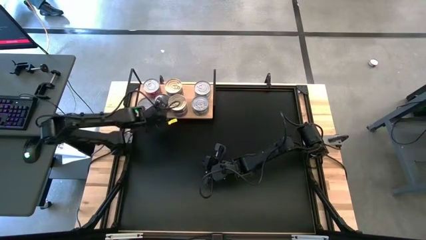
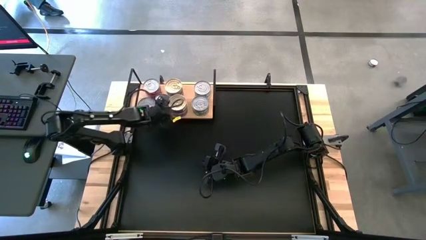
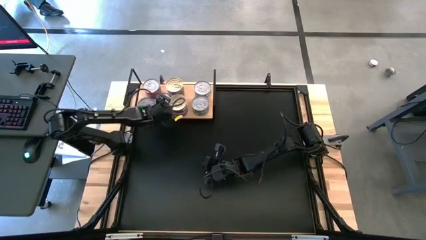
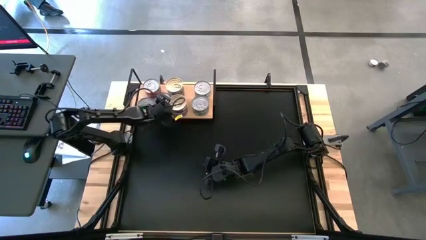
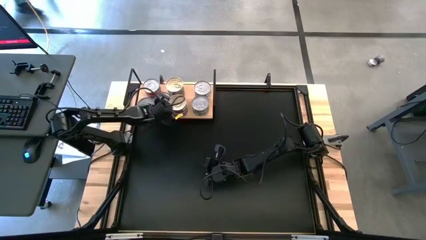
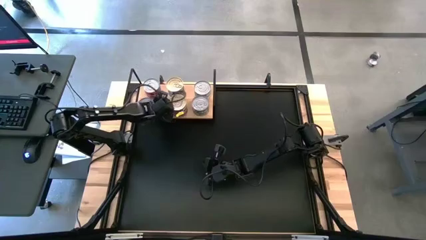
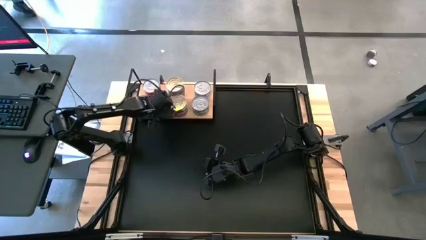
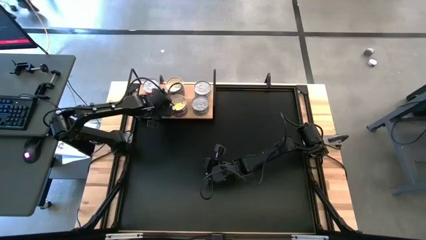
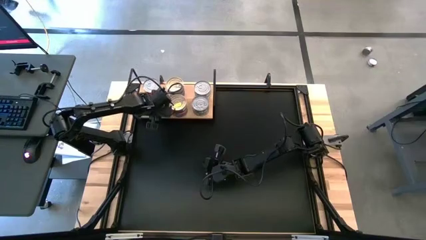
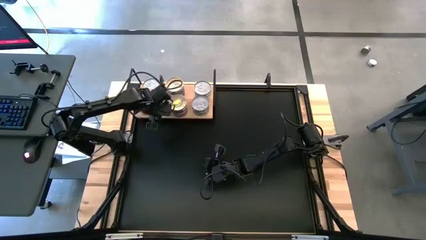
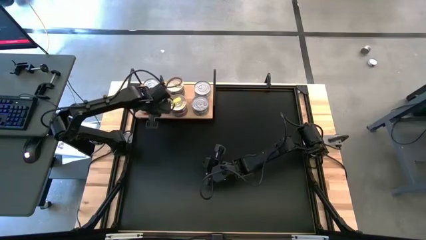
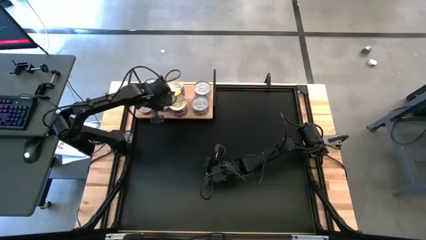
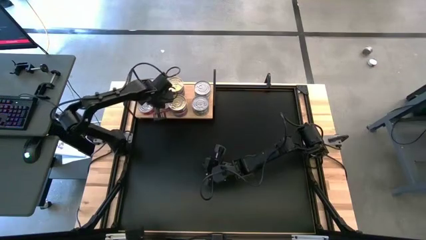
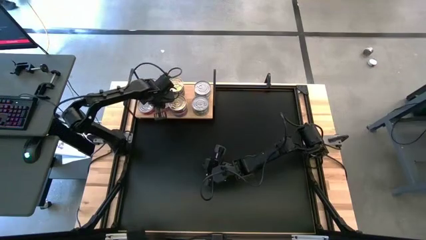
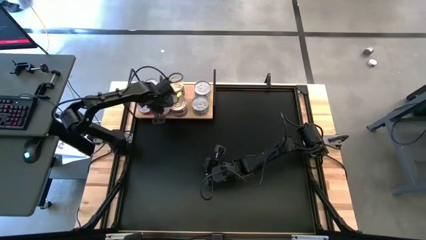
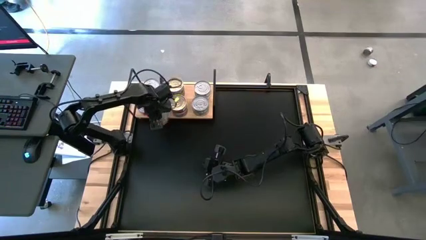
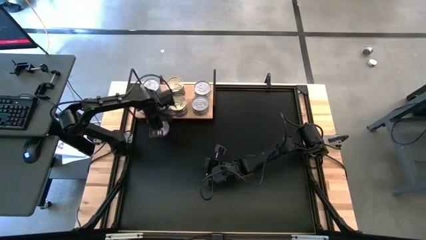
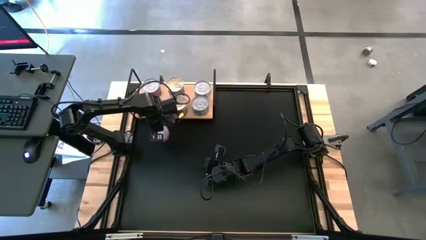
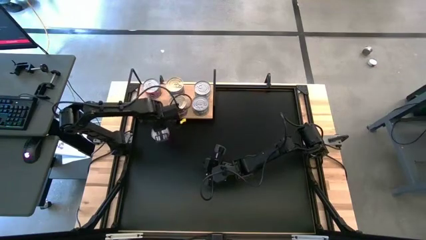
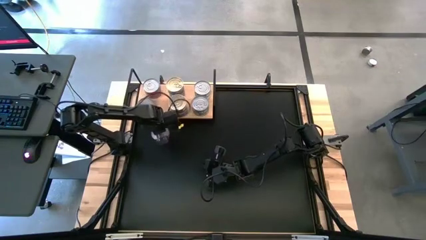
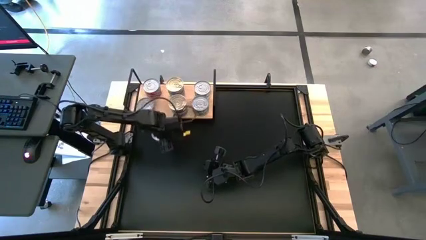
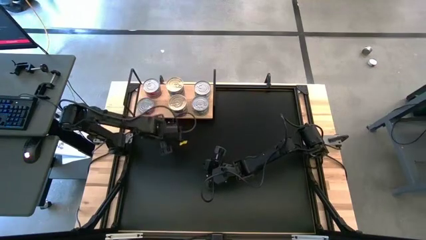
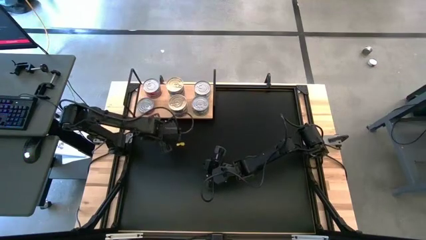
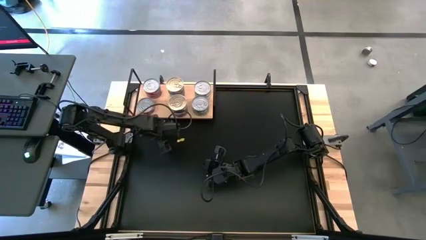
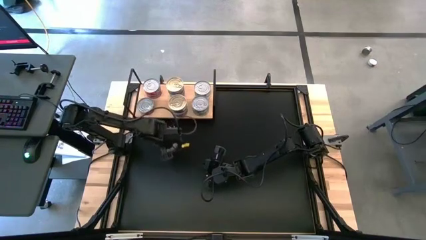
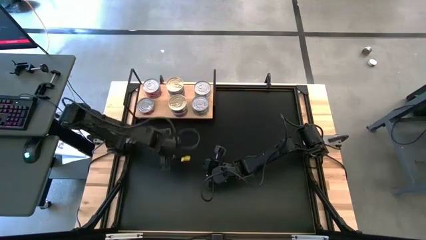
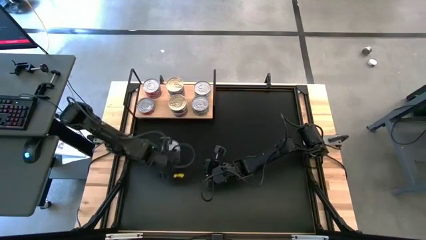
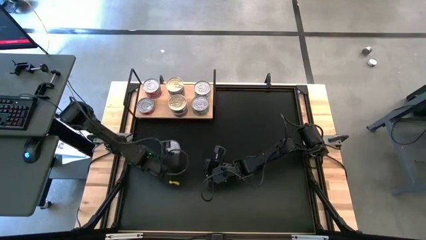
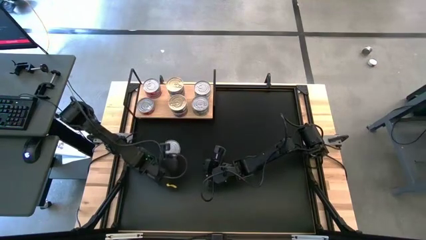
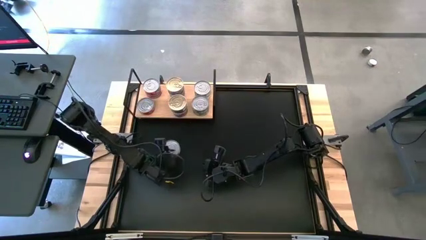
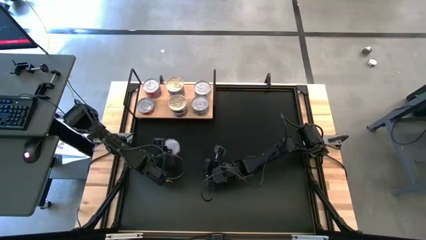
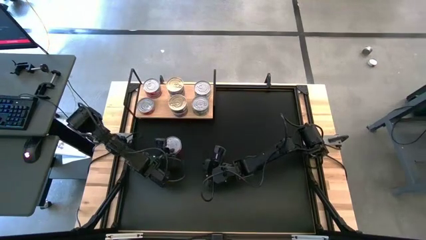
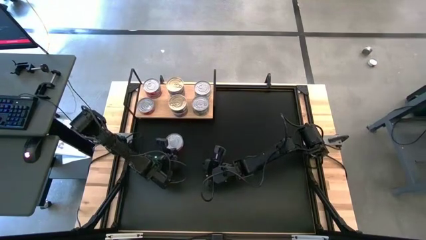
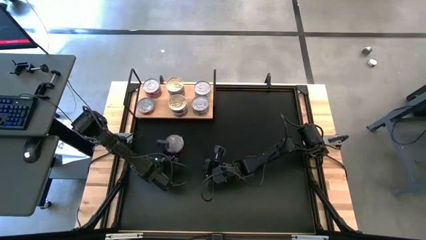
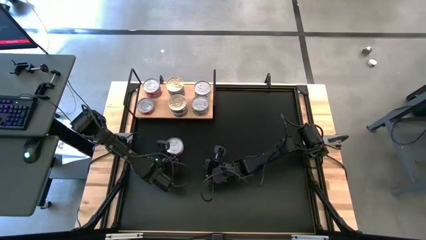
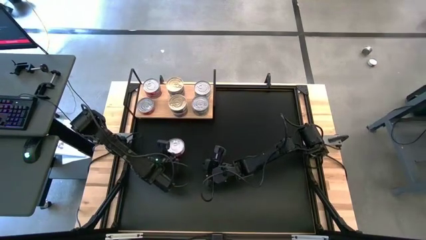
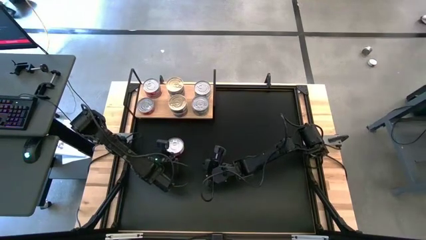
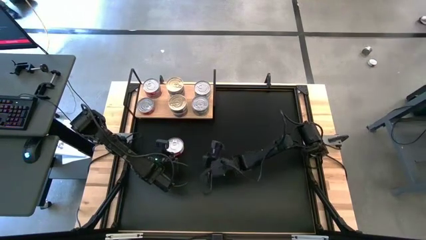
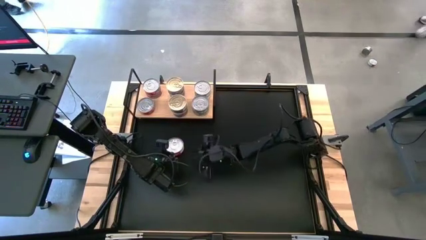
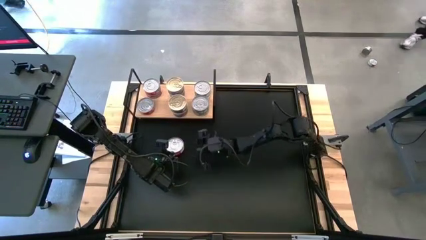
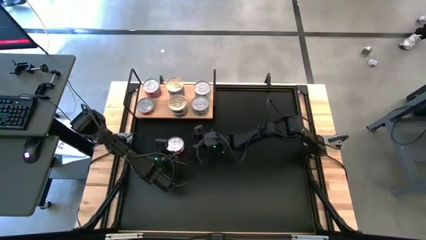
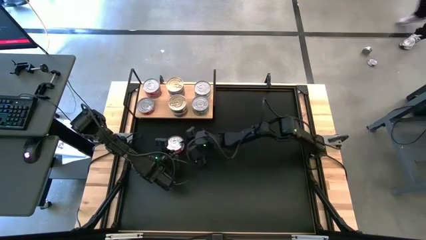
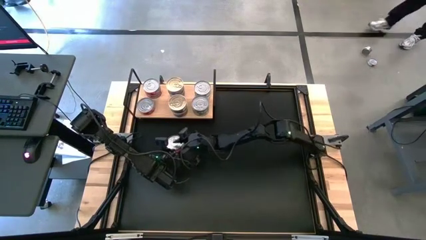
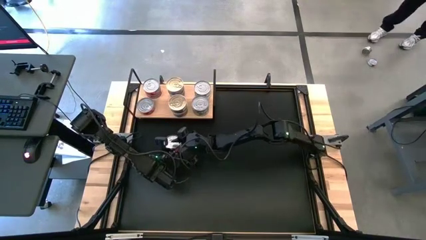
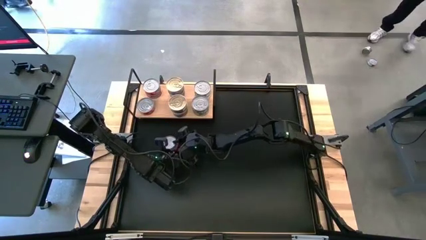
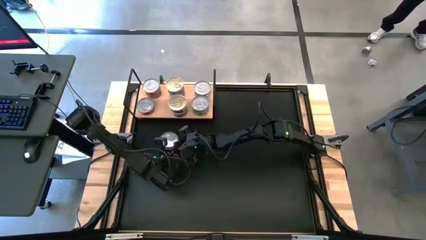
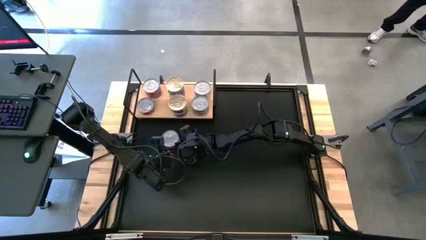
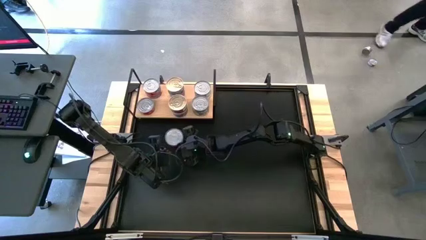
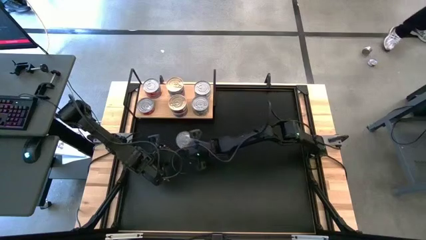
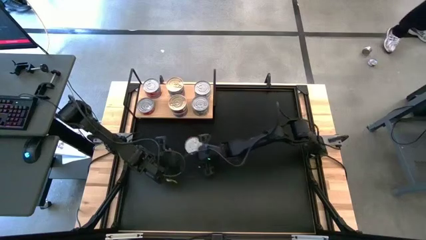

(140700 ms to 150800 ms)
Task: Stack canned seafood by type on shelf
Stack the red tuna can on the top of the other red tuna can

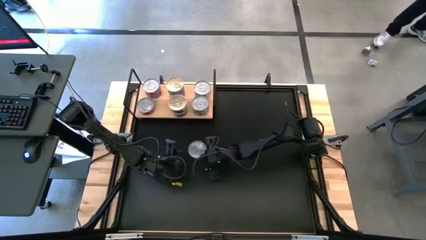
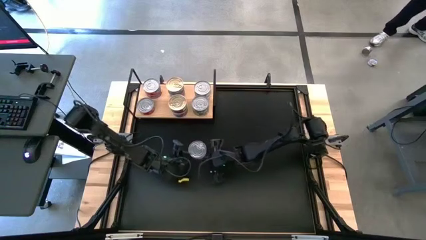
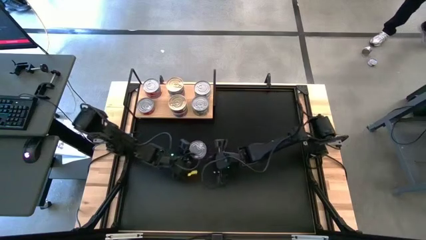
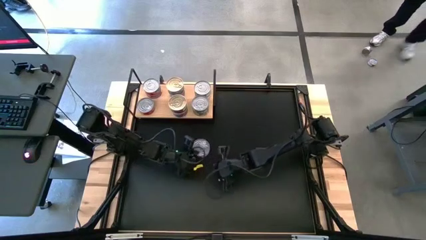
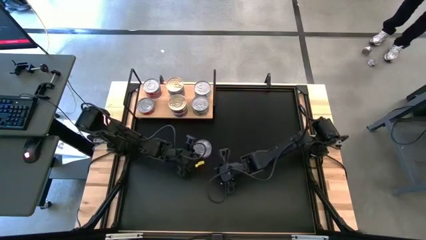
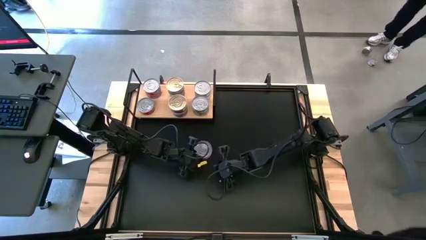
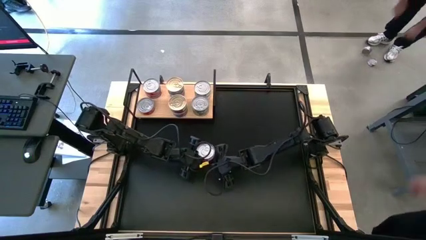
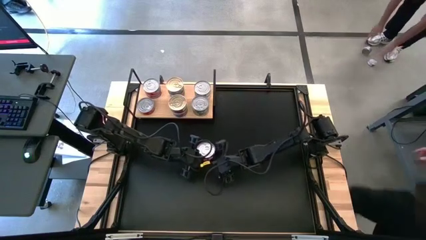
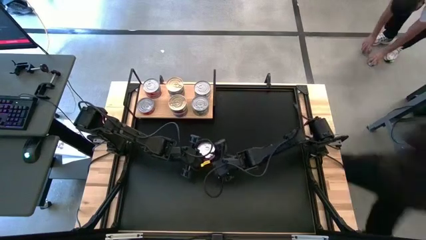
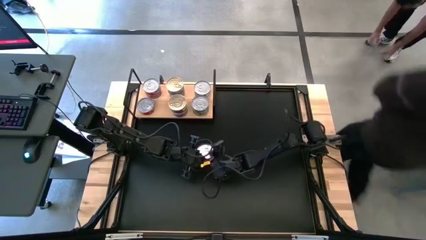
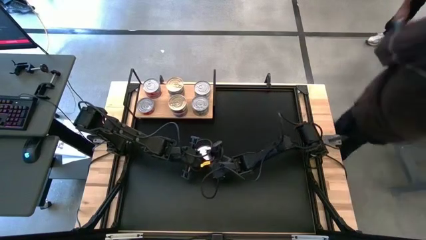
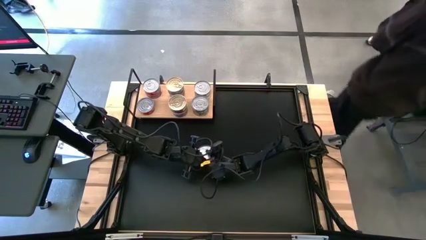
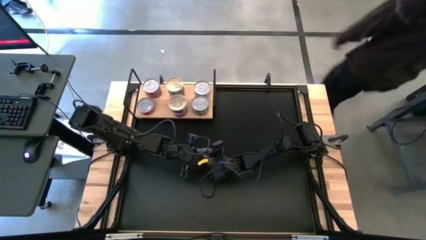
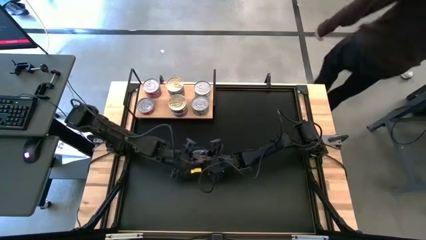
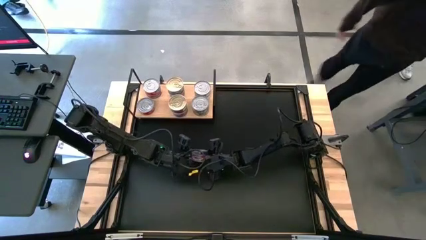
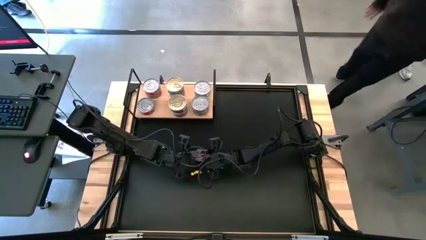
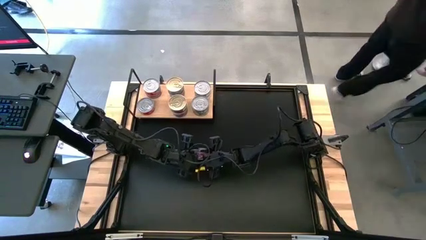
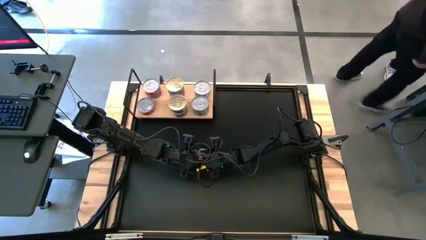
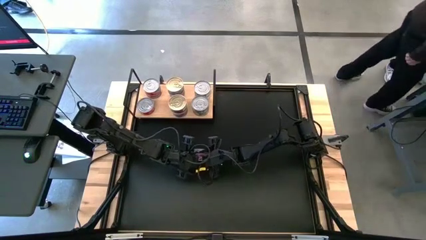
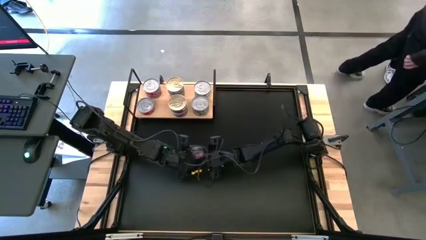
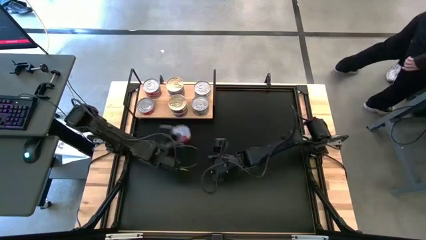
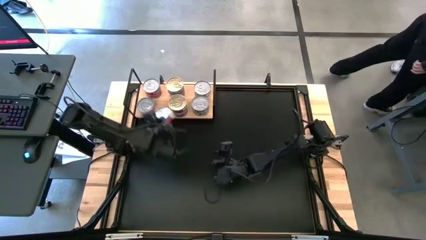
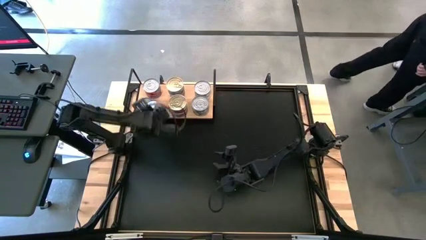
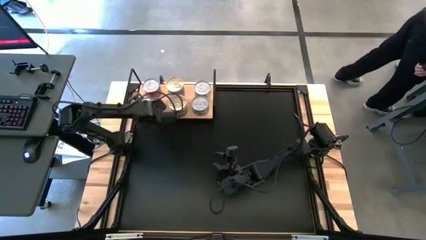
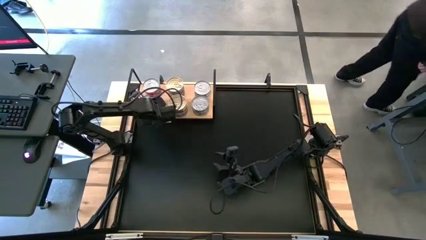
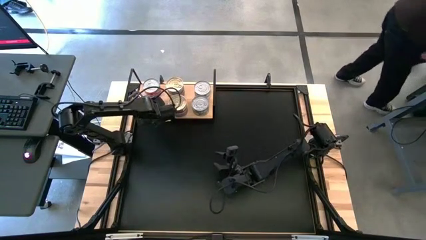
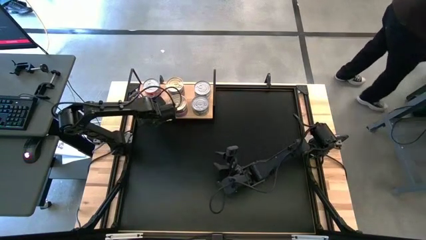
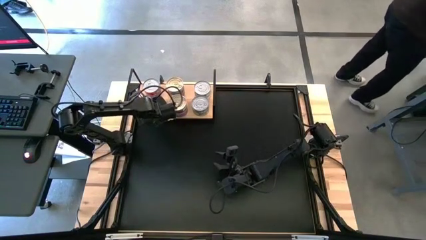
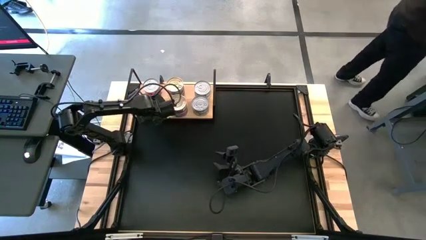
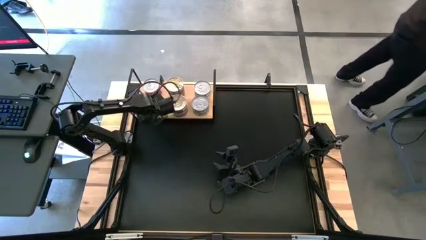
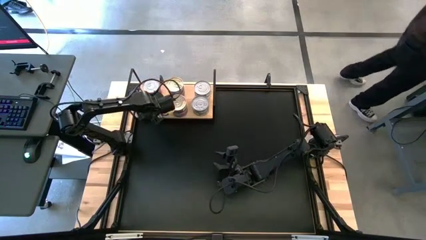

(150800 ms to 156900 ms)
Stack the red tuna can on the top of the other red tuna can
